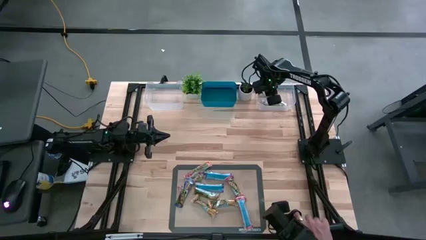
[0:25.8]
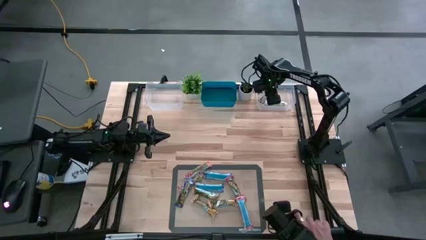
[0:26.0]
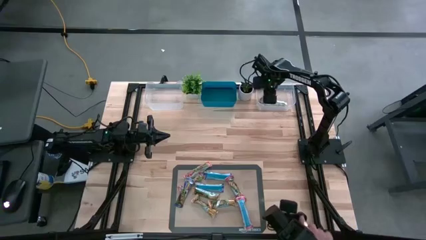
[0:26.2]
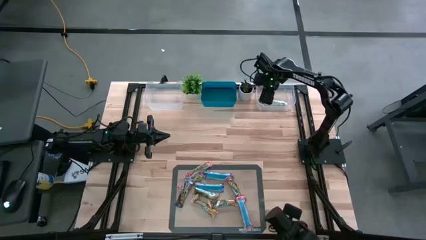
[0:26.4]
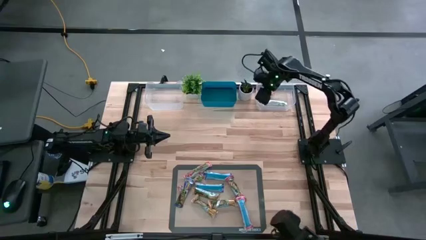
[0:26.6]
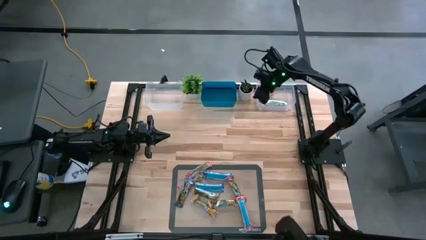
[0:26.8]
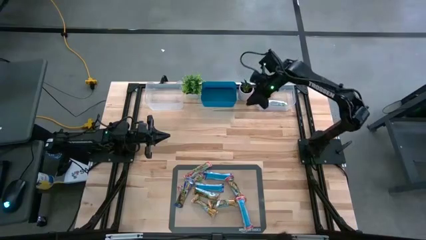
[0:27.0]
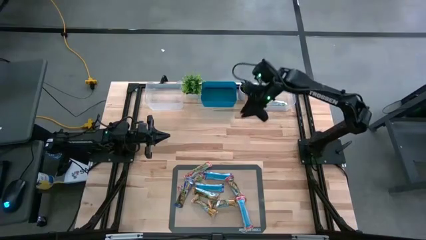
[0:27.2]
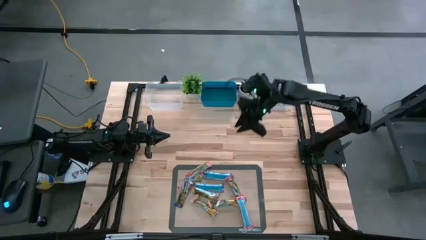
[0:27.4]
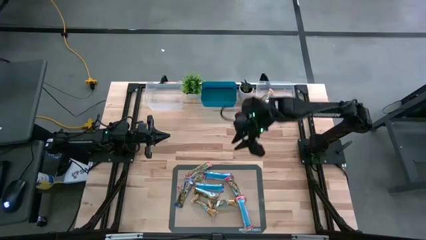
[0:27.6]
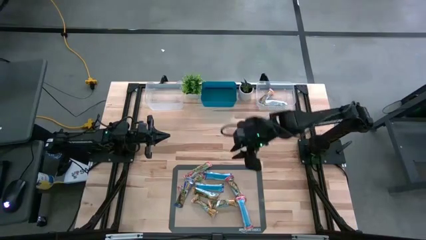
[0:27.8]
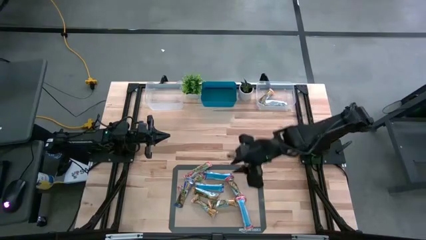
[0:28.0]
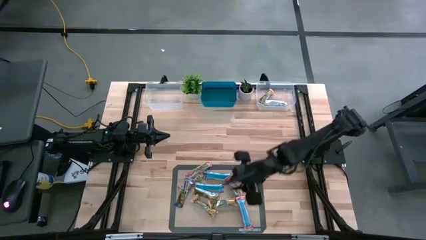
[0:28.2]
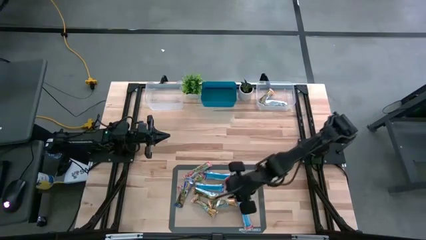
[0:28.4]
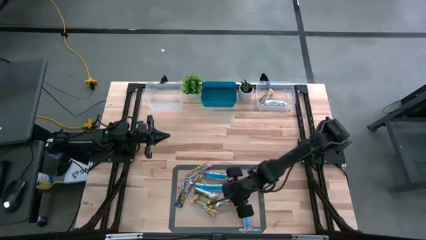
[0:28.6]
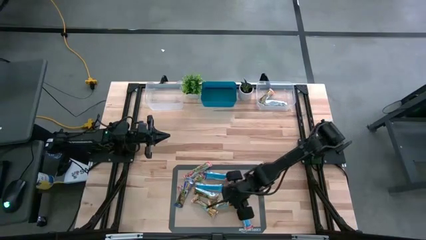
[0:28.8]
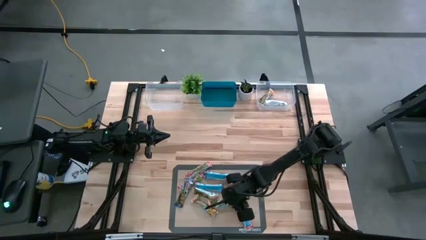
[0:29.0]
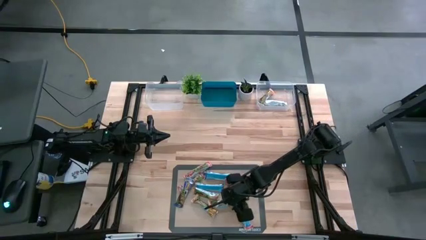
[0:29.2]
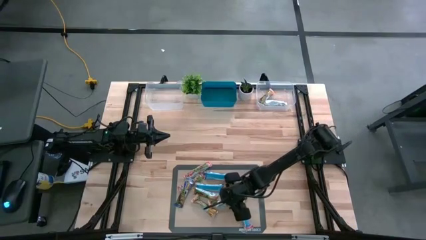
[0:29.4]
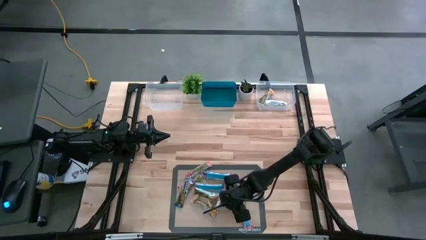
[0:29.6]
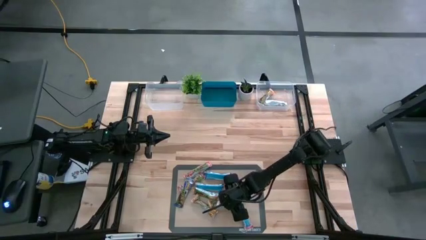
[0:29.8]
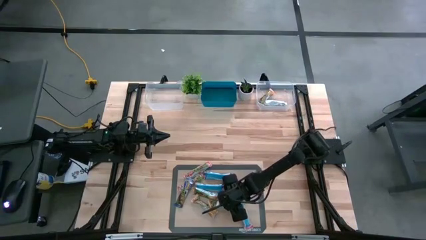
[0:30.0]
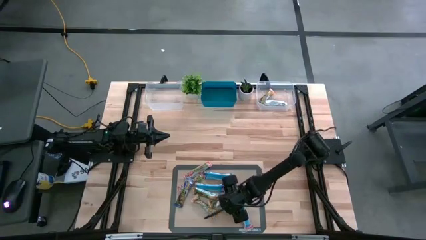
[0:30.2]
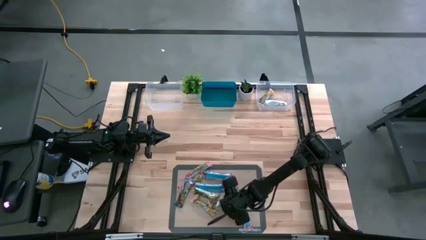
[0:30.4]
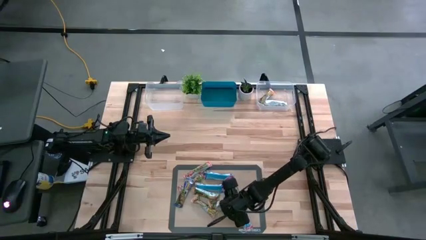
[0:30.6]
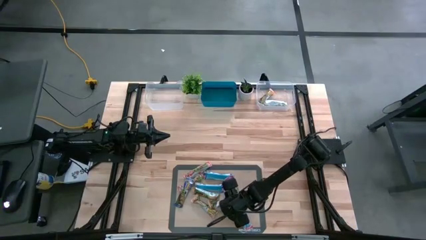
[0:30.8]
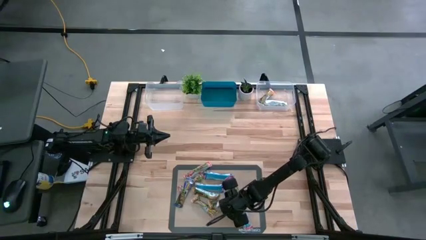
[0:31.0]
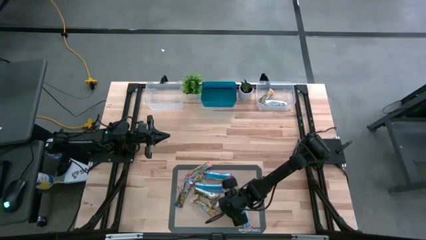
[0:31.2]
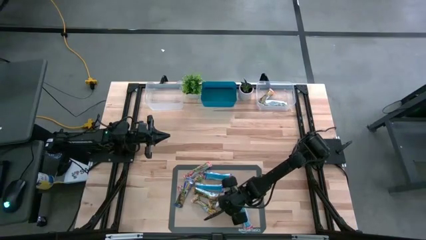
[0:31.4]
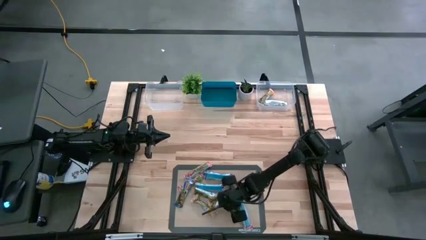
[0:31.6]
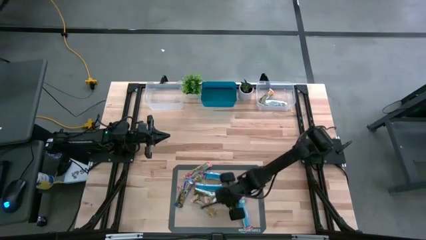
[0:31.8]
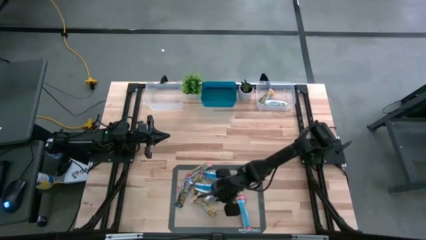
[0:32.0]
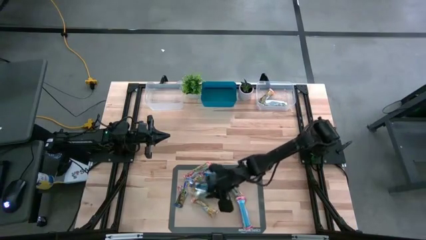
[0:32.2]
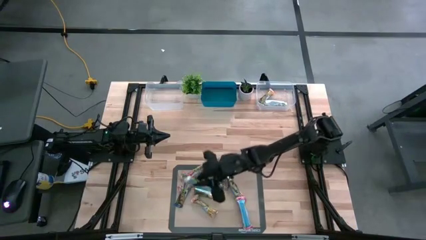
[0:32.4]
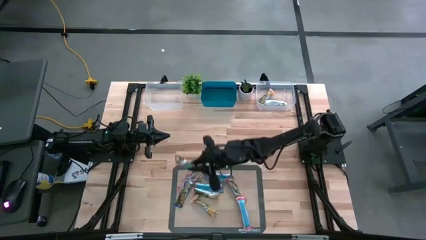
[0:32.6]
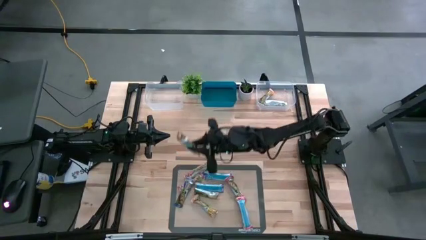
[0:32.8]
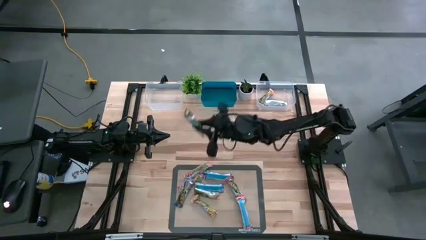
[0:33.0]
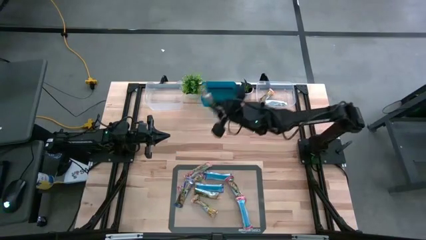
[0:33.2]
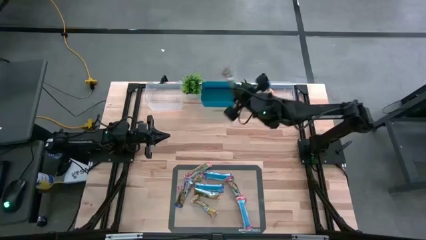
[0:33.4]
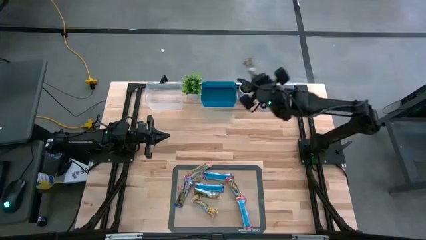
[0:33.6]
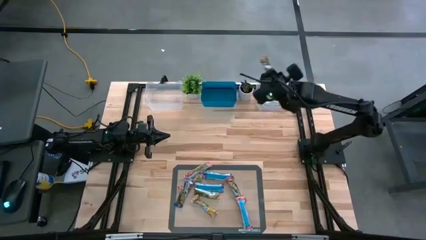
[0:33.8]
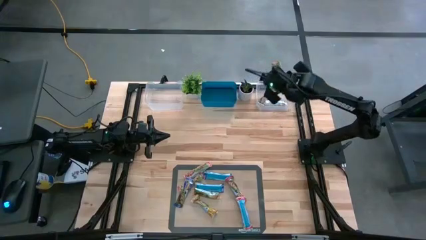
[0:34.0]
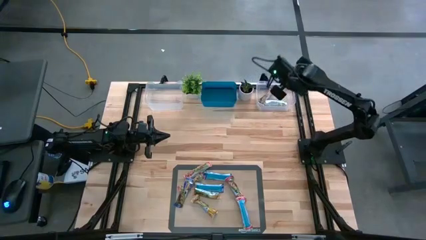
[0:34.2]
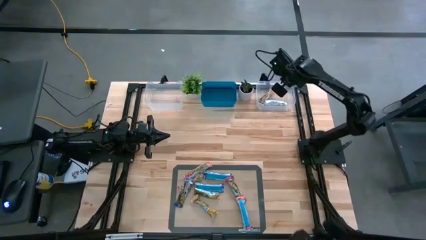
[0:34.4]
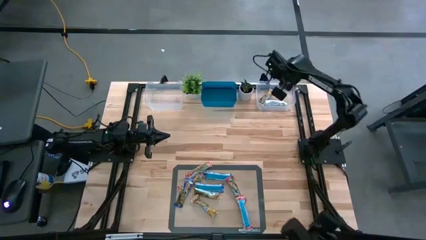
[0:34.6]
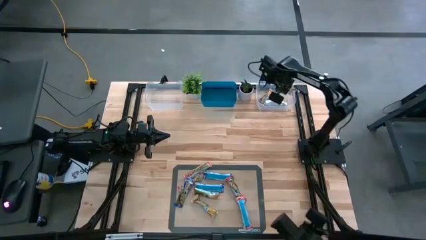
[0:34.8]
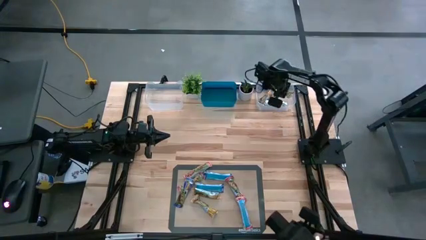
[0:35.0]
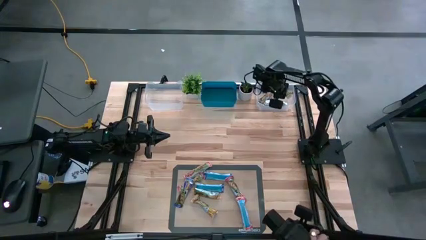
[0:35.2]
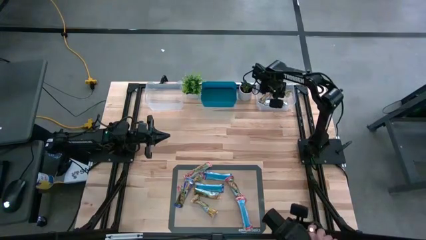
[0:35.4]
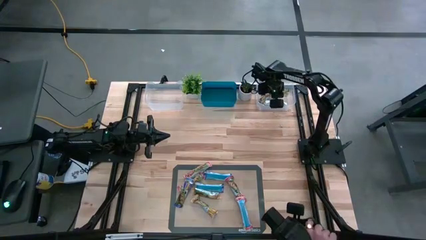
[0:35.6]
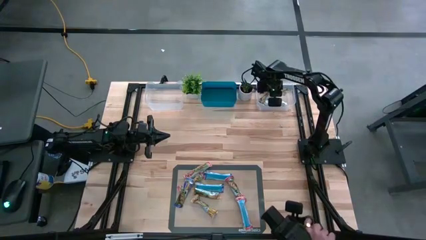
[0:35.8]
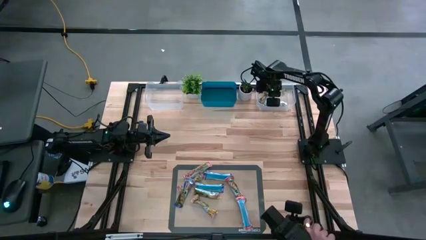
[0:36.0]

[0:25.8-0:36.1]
Task: Pick and place Granola Bars by type
Put the yellow granola bar into the right transparent bin

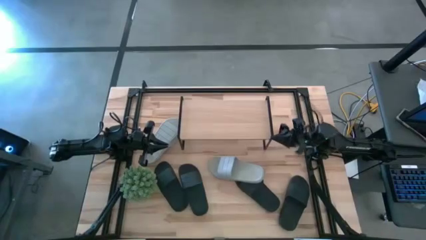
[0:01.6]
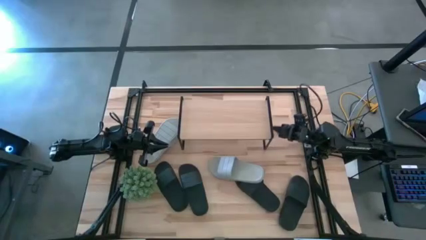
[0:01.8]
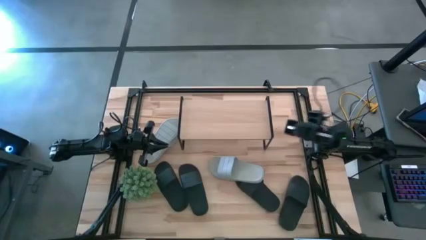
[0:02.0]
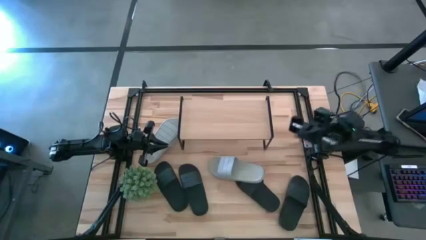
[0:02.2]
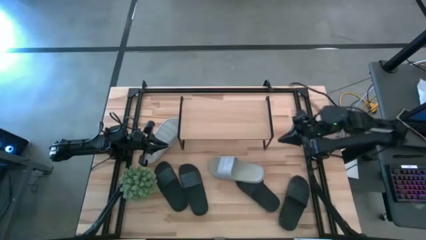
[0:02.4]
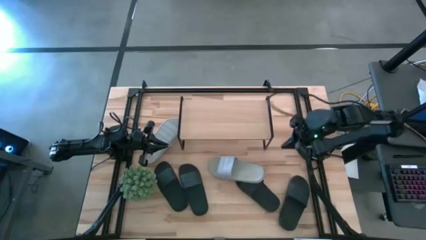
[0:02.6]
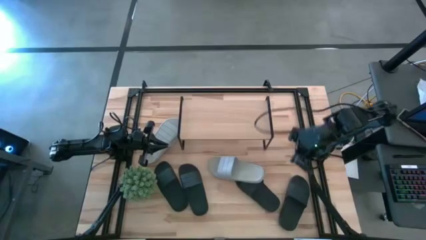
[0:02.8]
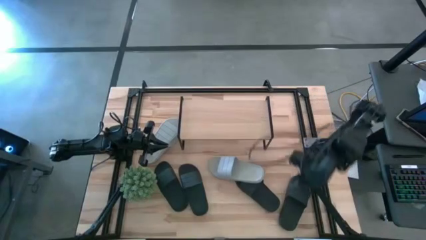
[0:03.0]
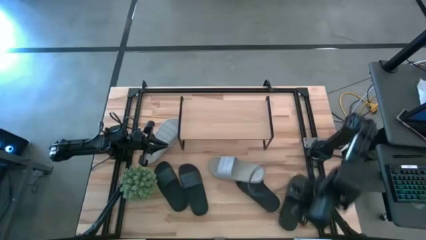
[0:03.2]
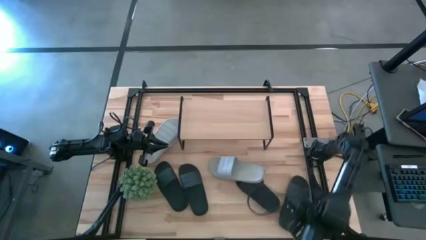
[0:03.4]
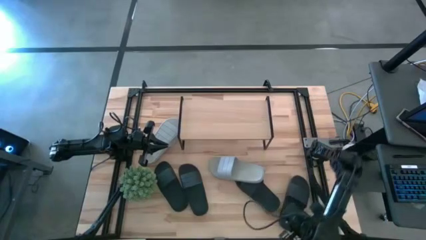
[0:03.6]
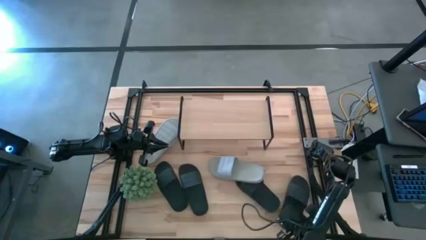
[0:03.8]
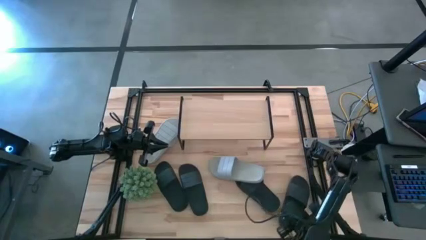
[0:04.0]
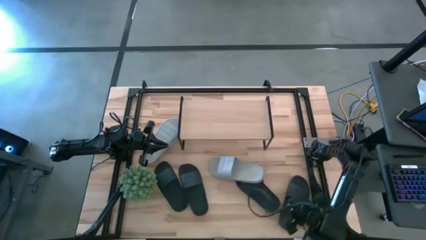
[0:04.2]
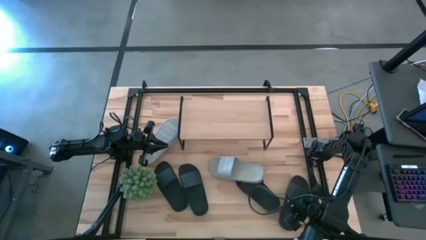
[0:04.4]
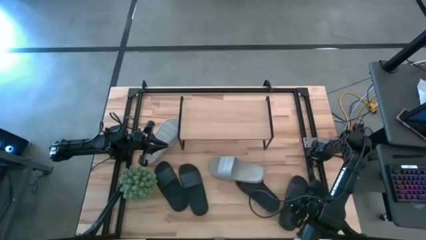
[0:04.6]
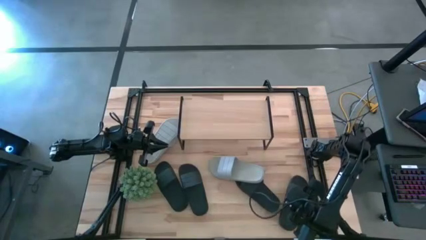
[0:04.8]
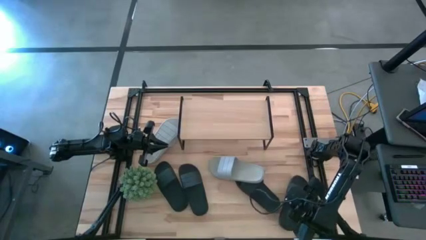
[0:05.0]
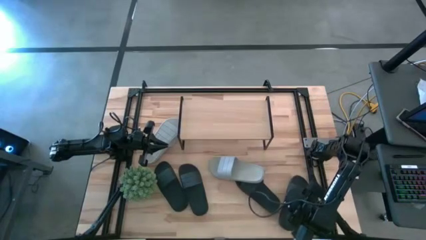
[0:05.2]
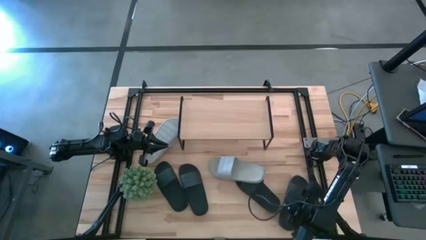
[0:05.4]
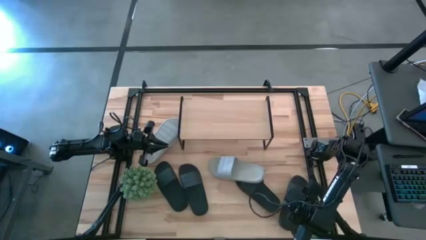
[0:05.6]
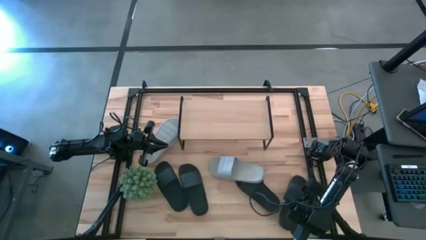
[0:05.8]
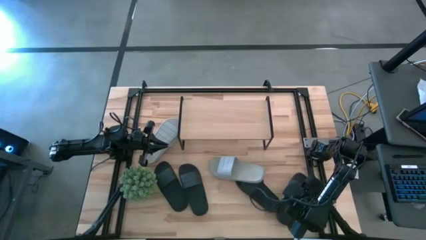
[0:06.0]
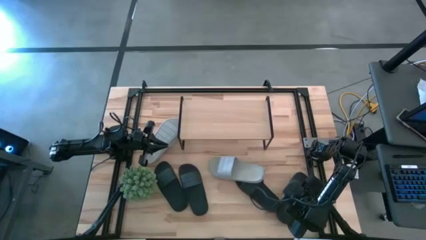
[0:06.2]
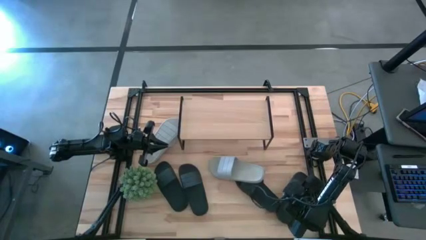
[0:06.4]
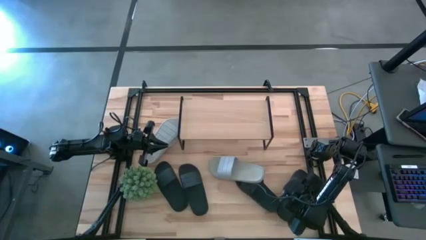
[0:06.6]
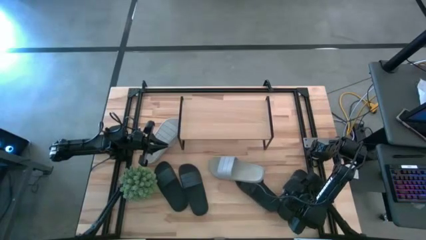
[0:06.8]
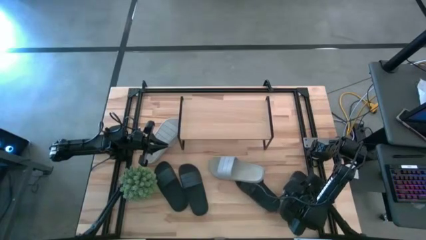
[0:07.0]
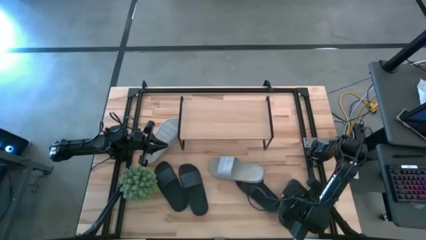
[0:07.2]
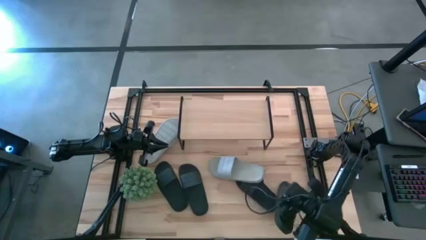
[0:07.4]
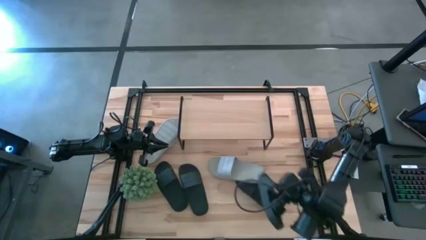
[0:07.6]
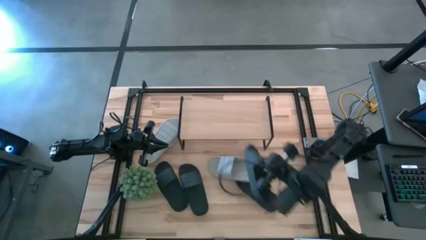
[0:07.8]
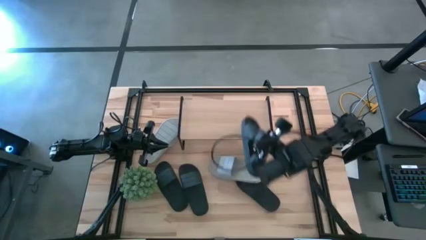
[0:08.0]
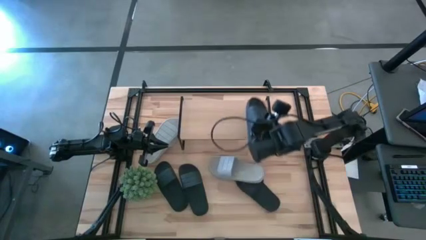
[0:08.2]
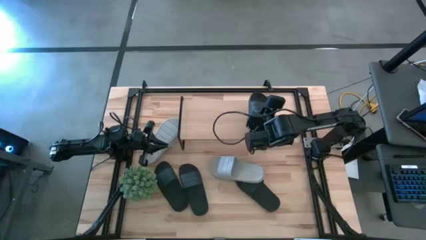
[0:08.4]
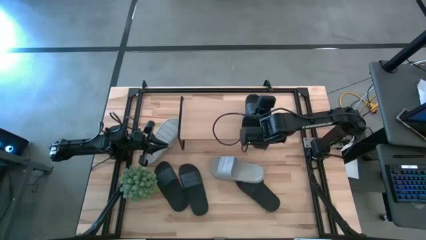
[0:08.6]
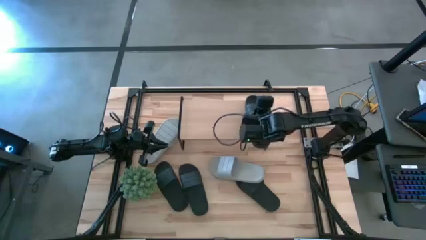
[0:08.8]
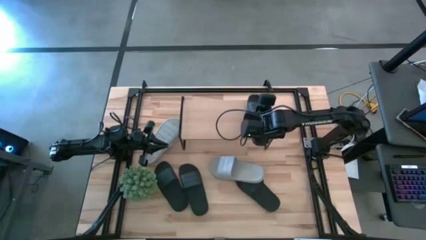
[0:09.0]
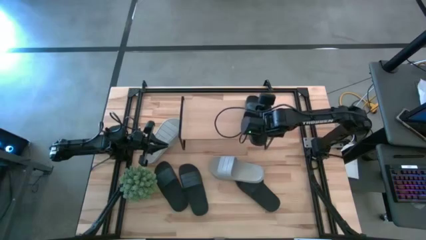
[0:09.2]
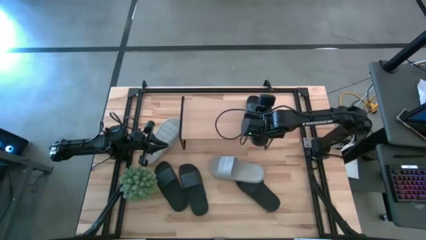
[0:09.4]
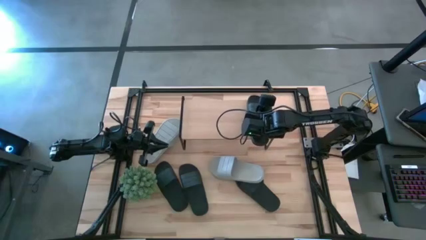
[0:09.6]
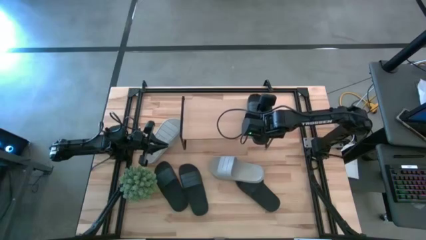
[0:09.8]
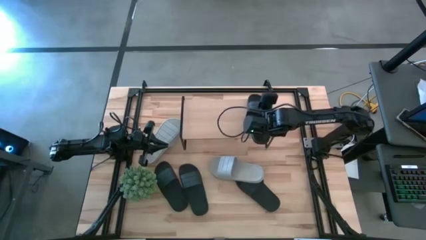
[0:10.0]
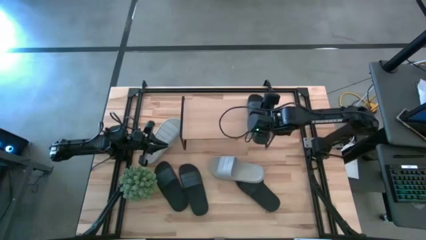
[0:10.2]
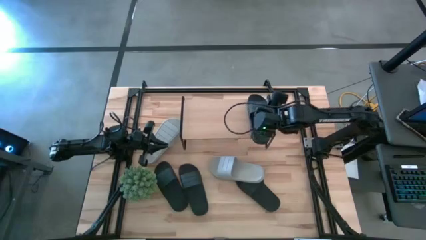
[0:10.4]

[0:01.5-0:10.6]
Task: Pick and place slides into the shelf
Put the right black slipper on the shelf
